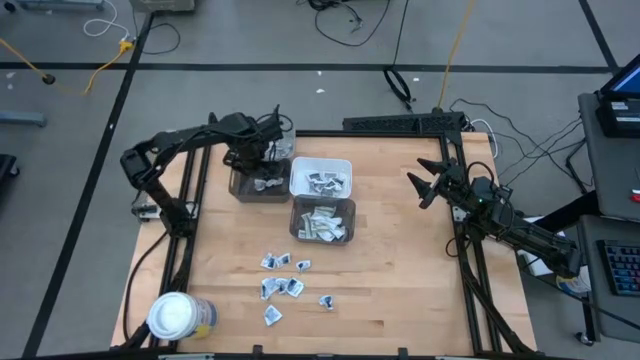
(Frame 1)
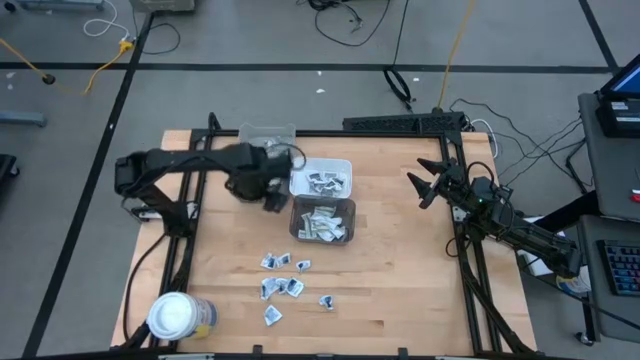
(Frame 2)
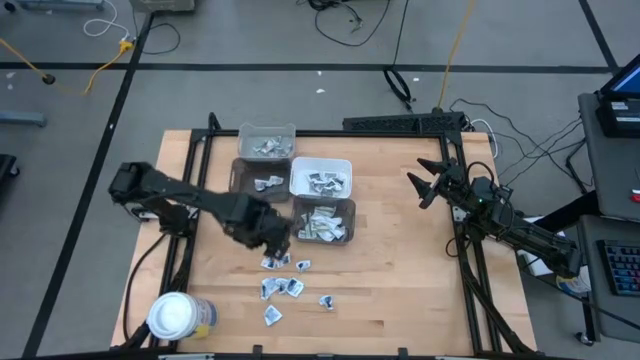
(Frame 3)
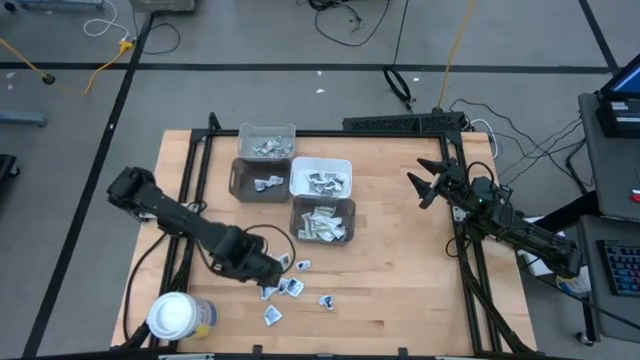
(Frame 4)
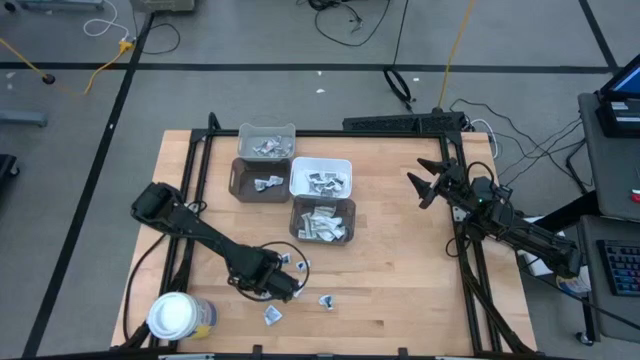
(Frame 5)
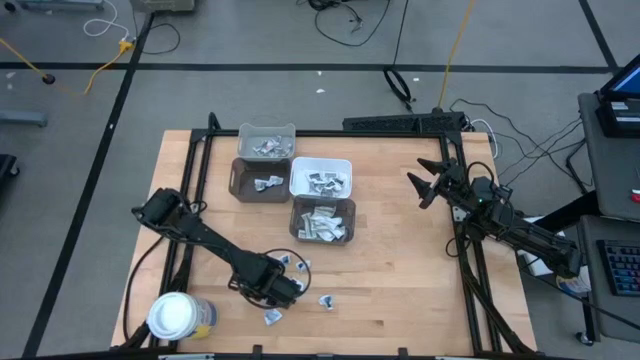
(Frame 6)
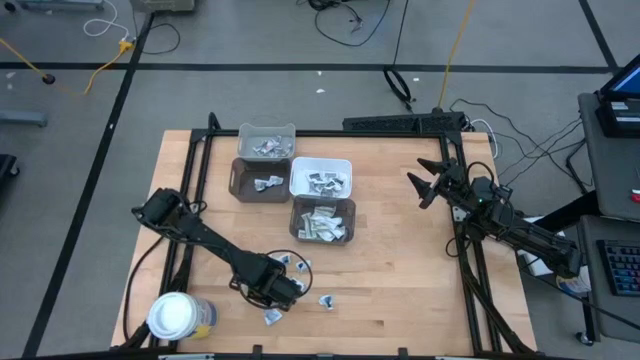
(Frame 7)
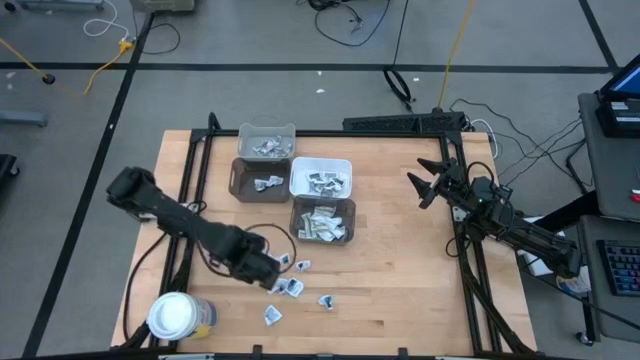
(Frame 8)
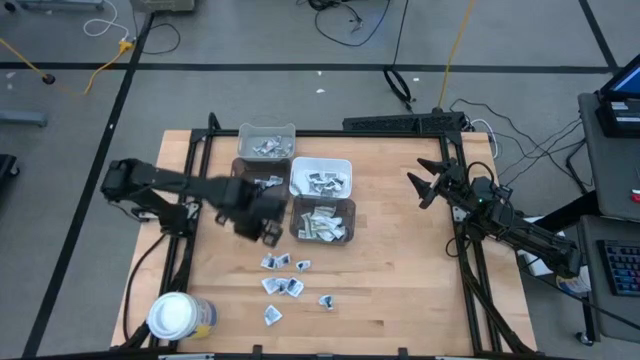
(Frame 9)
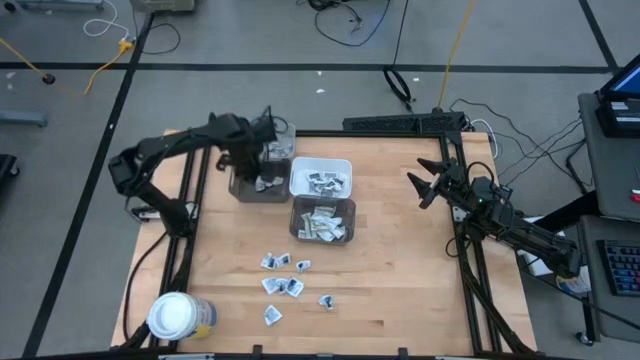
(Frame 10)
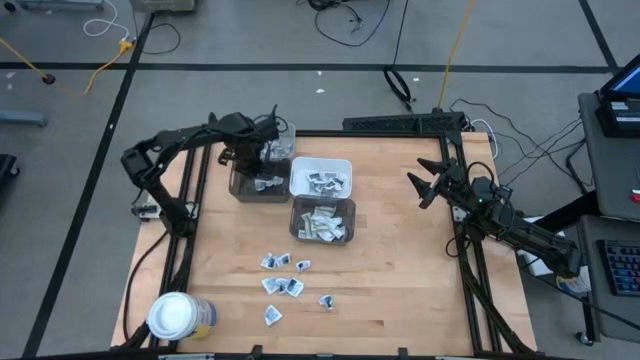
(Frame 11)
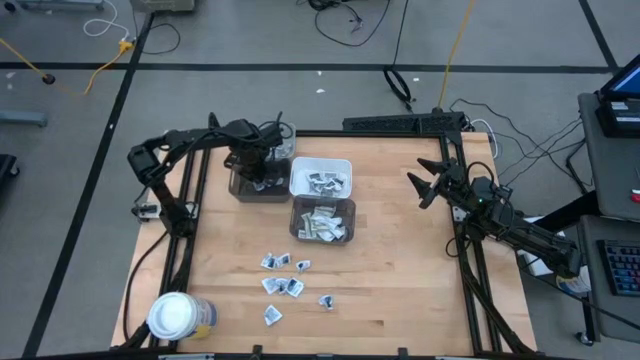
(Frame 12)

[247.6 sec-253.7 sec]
Task: Pick & Place First Aid Supplies
Put the blue alcohol pad into the left black bin

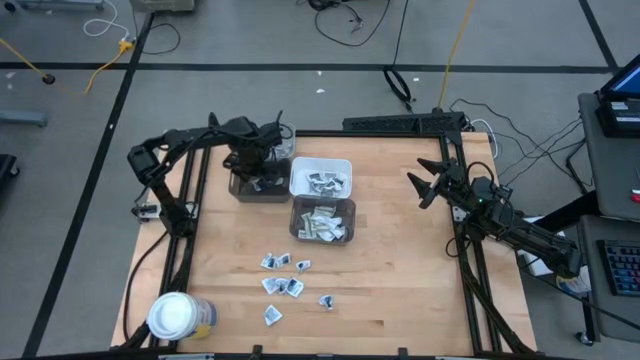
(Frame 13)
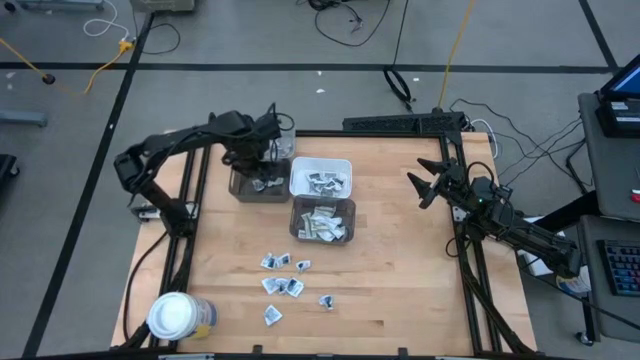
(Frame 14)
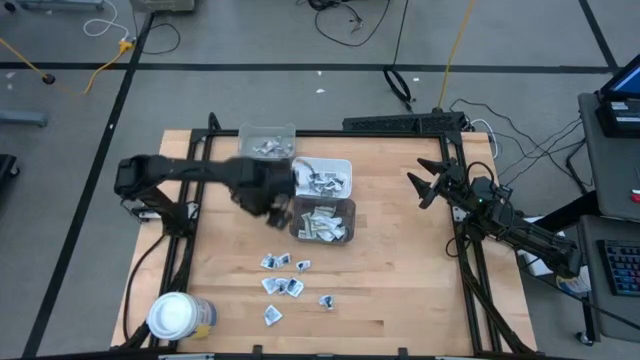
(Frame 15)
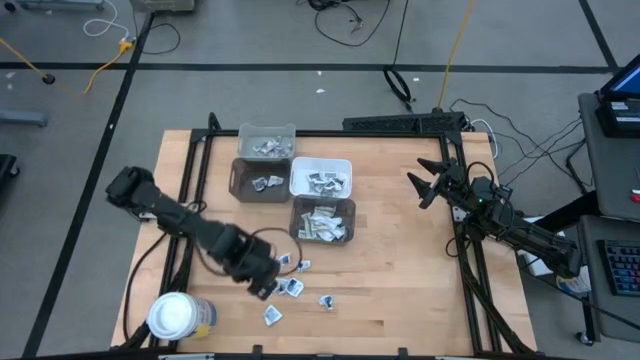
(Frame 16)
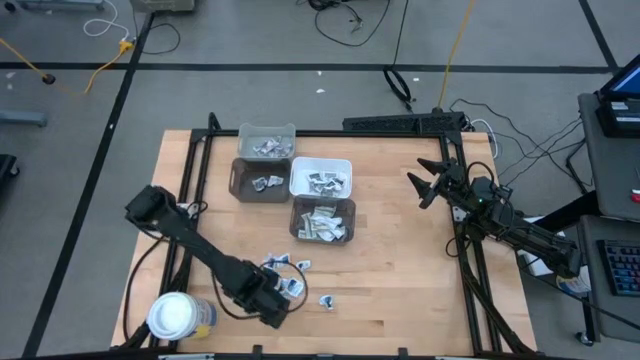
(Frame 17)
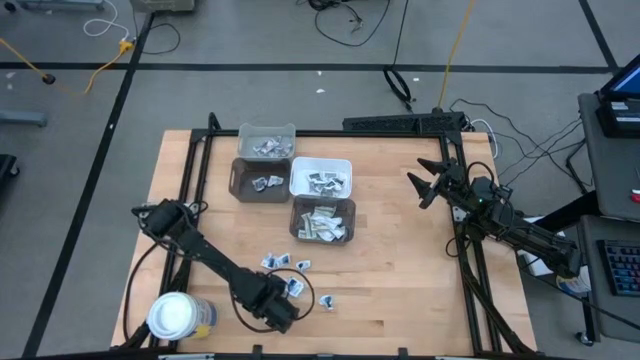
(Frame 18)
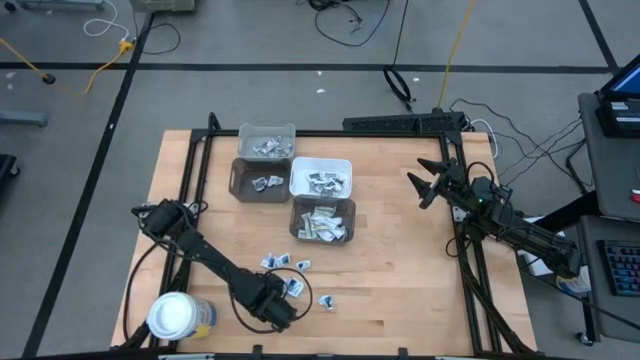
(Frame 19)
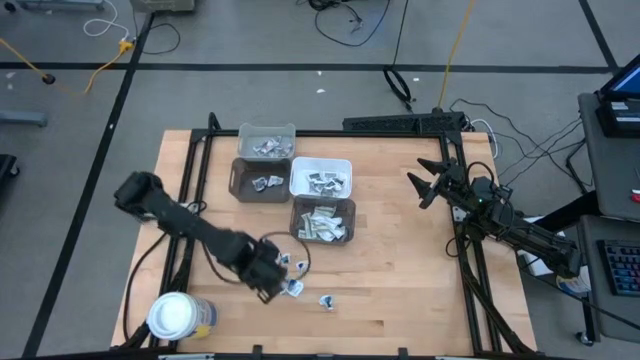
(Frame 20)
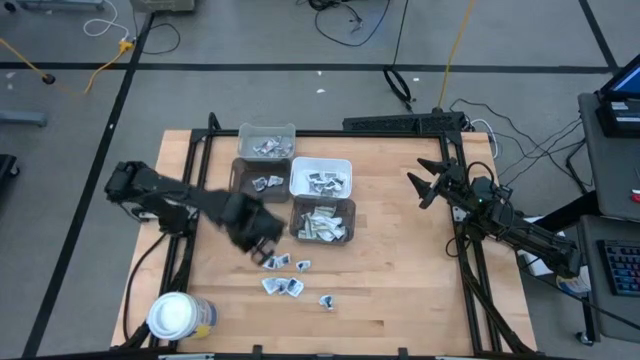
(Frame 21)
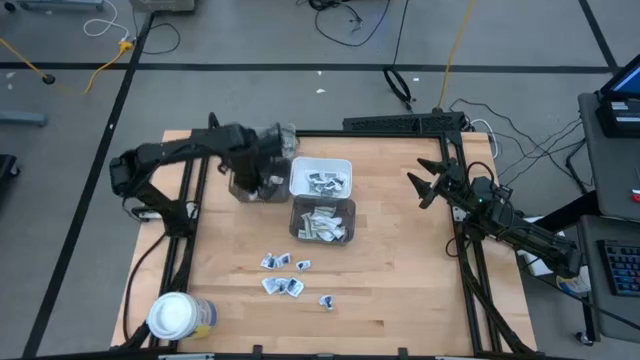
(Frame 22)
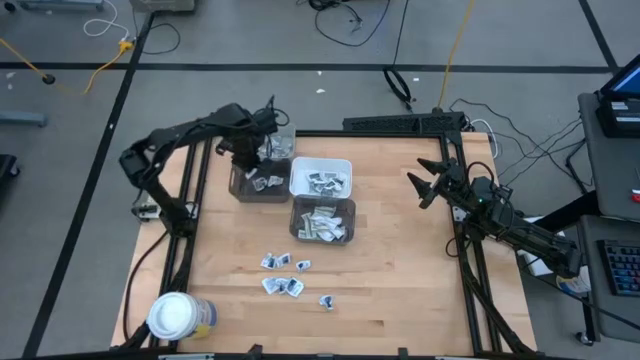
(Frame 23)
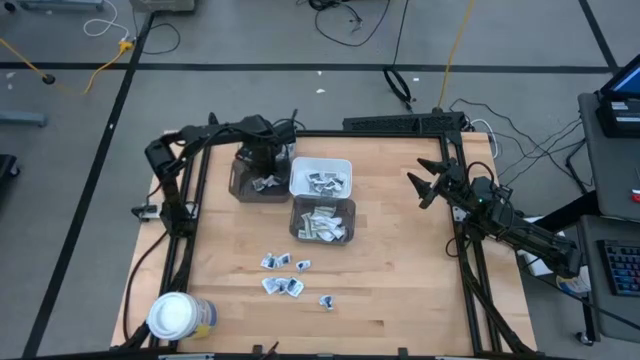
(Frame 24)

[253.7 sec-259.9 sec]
Put the blue alcohol pad into the left black bin

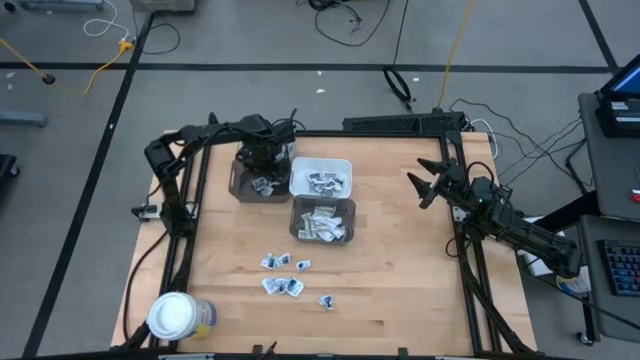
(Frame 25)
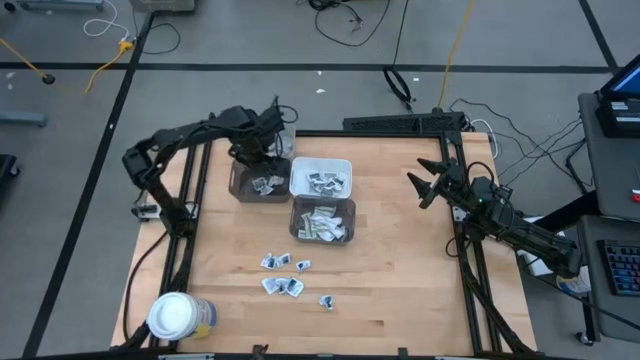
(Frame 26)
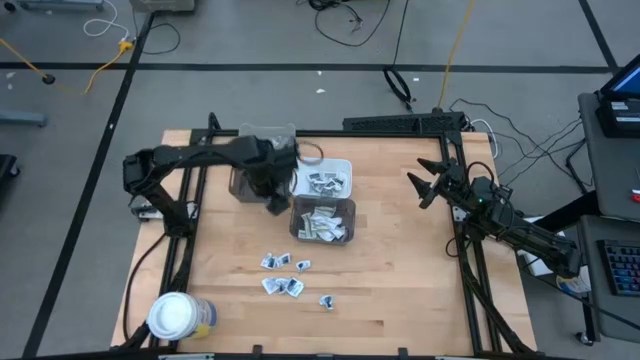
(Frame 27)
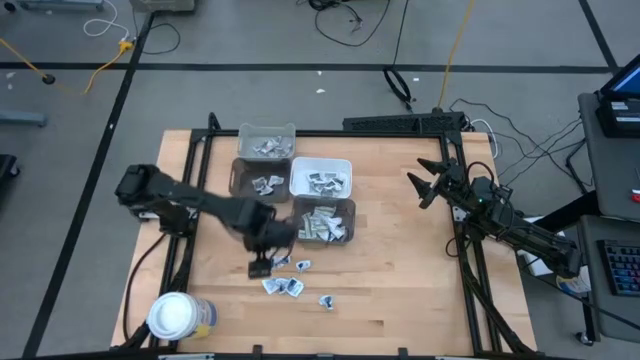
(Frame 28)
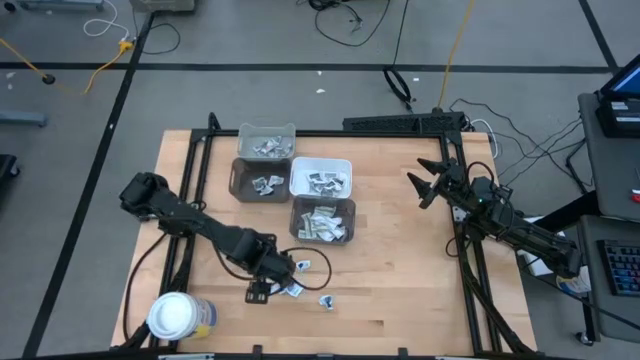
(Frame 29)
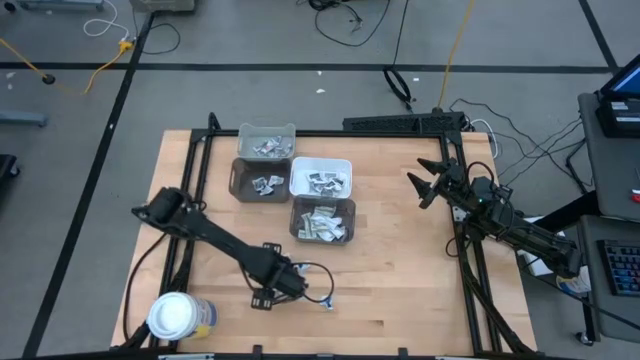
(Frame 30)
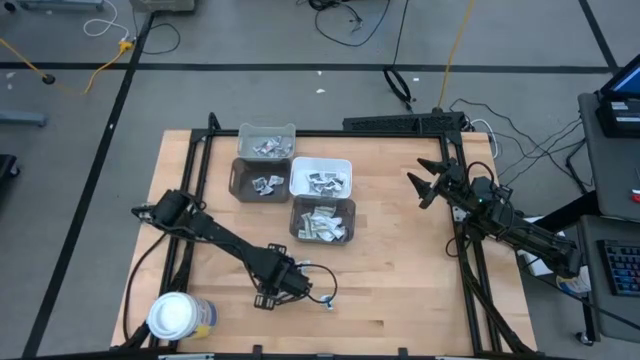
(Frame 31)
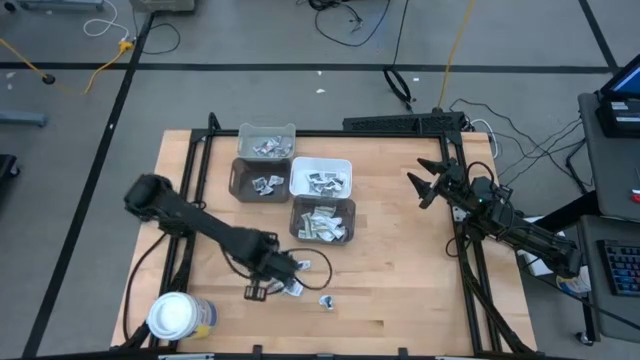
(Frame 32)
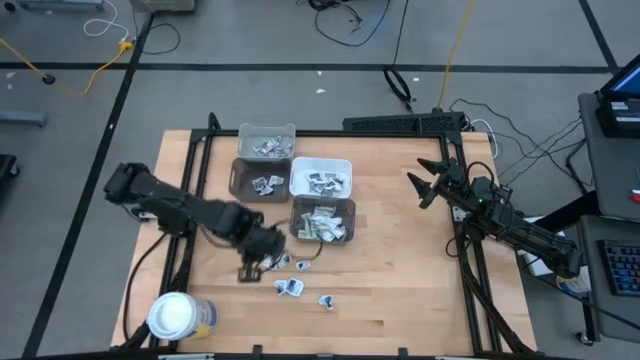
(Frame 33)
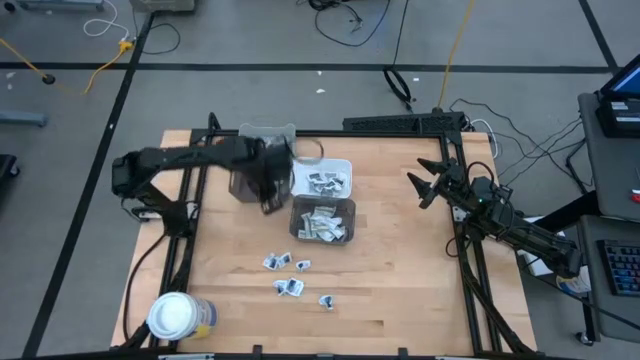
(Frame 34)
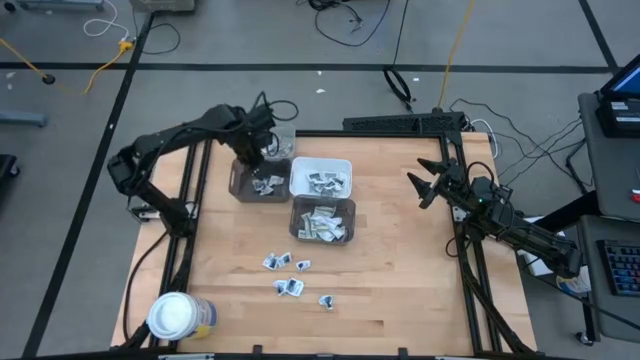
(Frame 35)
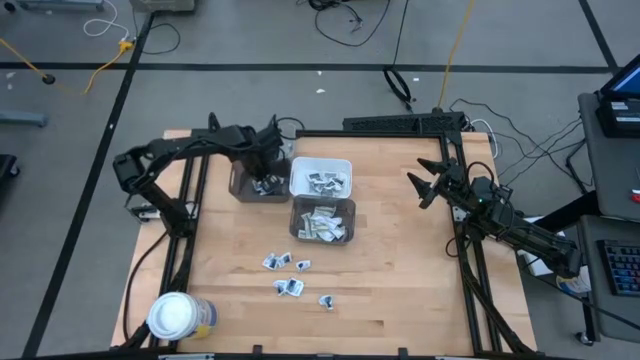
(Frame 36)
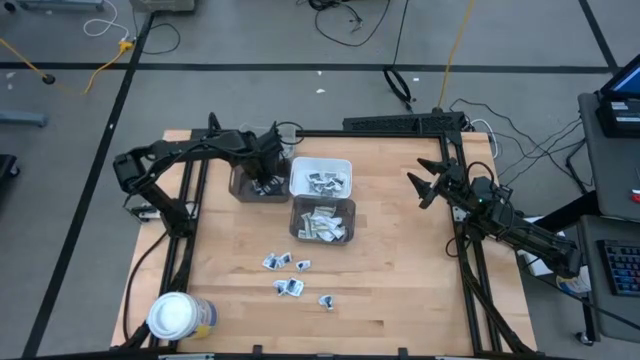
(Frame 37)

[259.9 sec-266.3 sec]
Put the blue alcohol pad into the left black bin

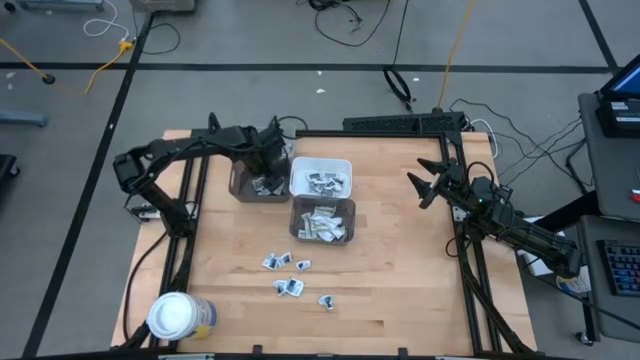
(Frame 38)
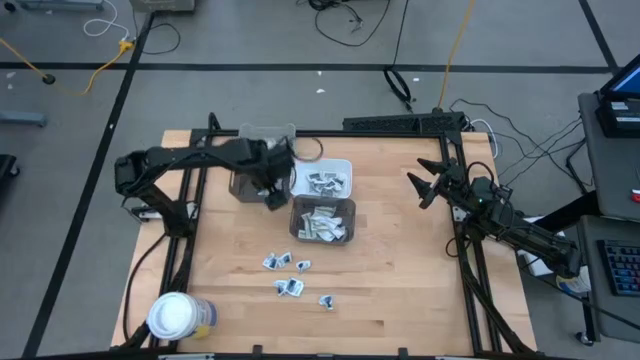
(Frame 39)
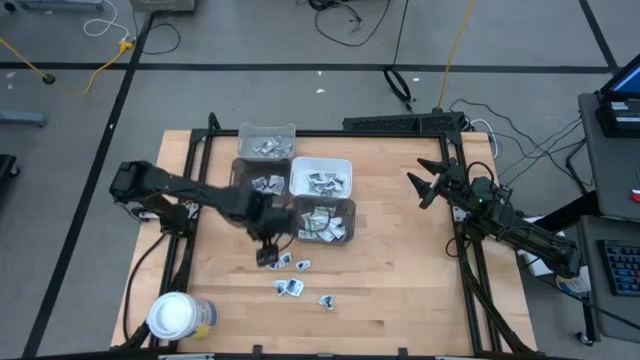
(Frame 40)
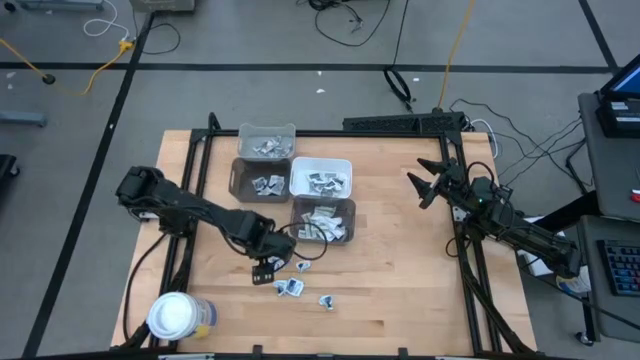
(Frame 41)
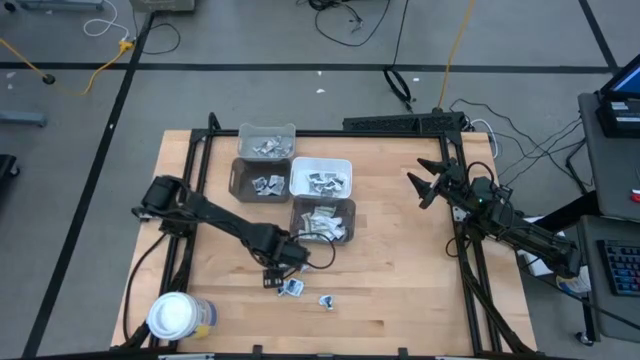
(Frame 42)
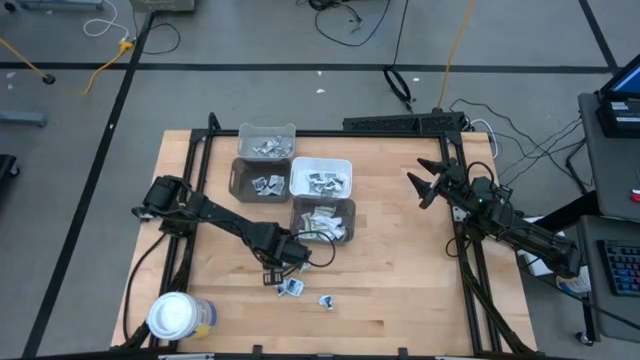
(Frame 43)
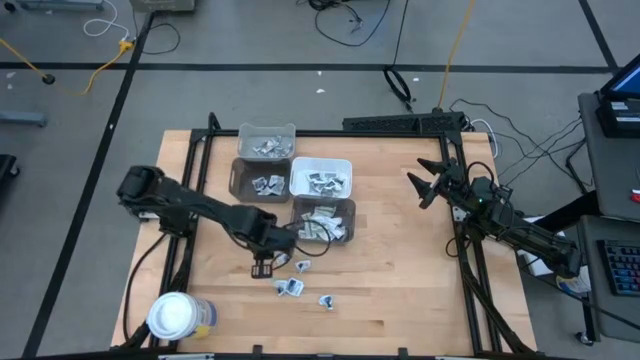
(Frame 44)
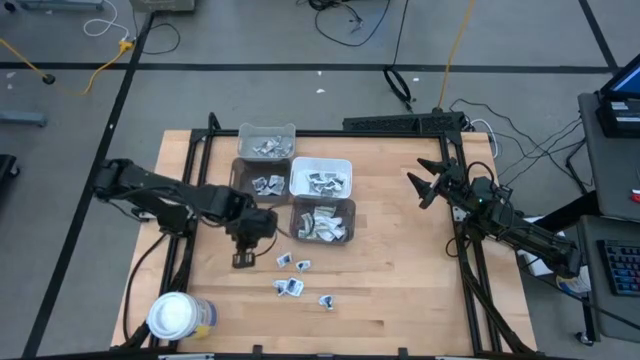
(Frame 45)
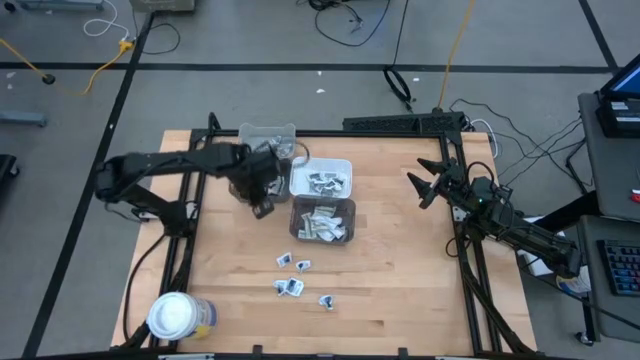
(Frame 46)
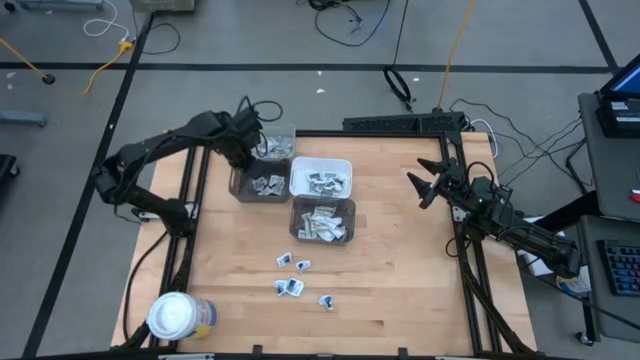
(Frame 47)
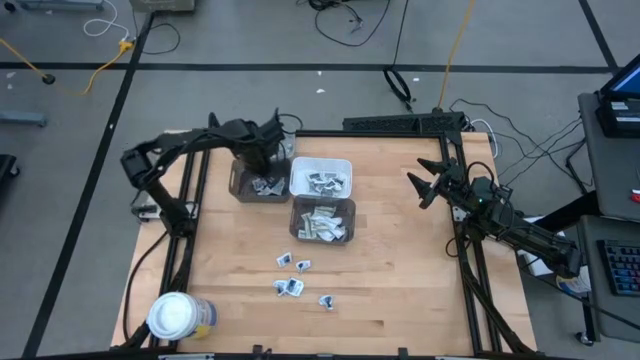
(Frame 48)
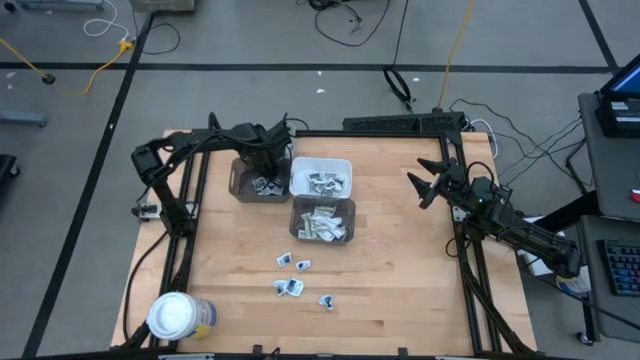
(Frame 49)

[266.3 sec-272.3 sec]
Put the blue alcohol pad into the left black bin
